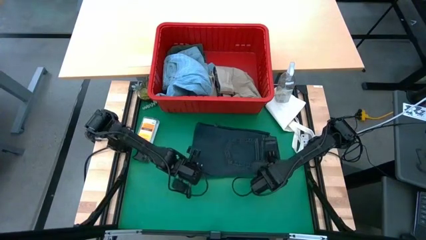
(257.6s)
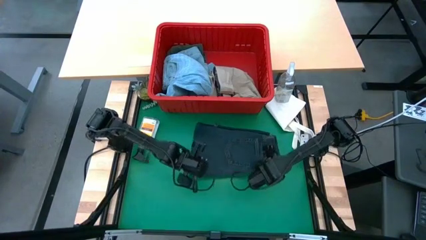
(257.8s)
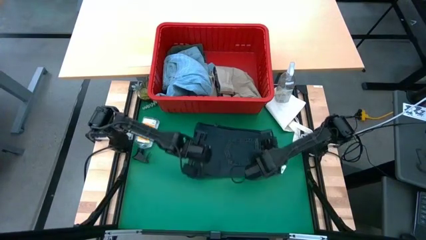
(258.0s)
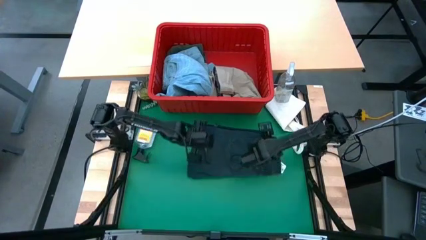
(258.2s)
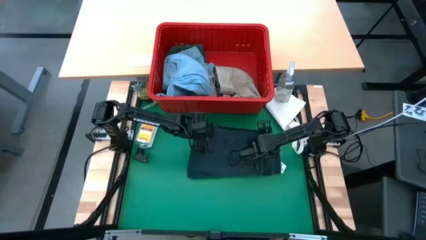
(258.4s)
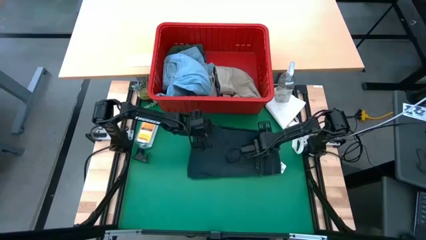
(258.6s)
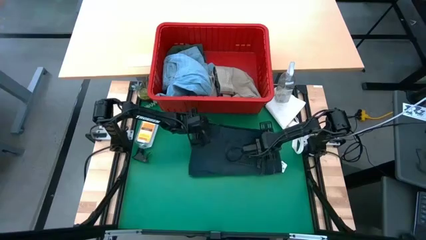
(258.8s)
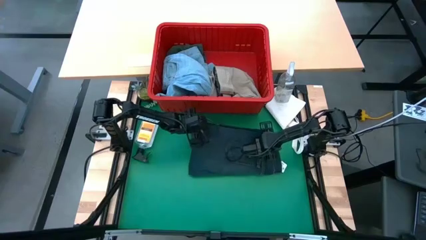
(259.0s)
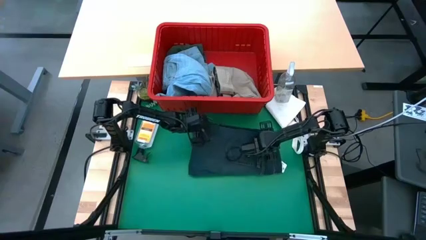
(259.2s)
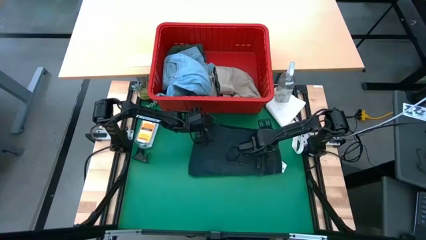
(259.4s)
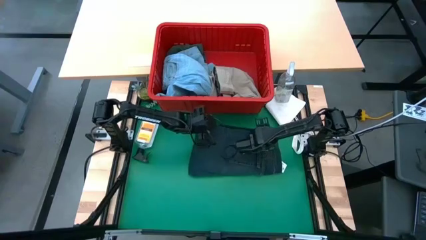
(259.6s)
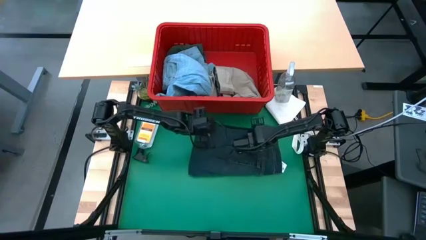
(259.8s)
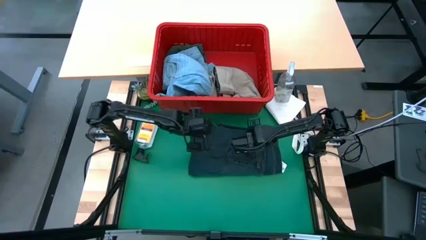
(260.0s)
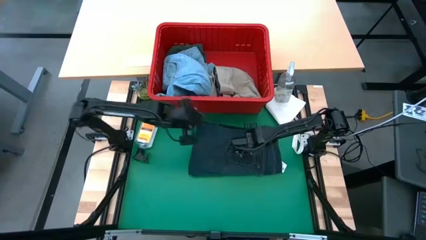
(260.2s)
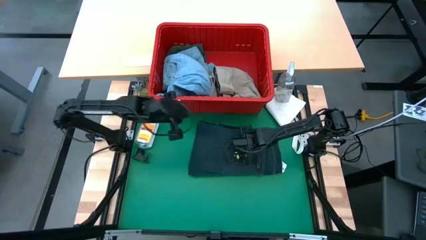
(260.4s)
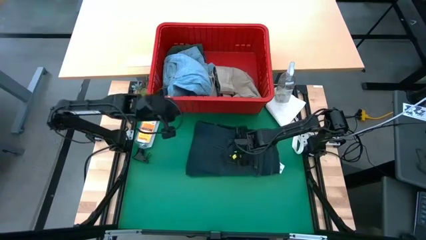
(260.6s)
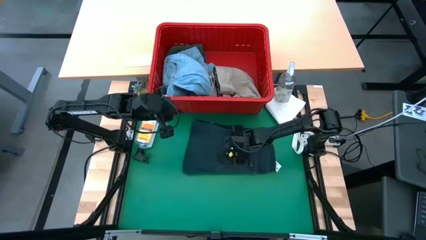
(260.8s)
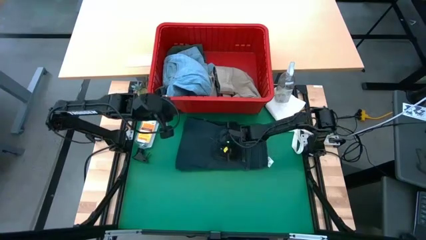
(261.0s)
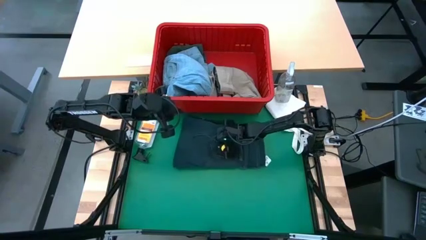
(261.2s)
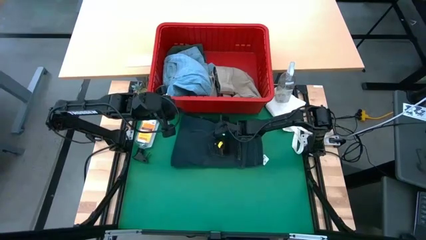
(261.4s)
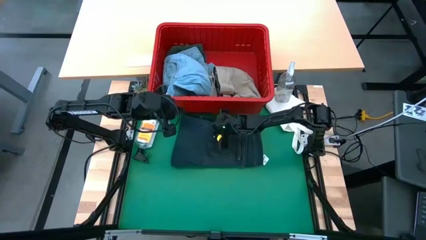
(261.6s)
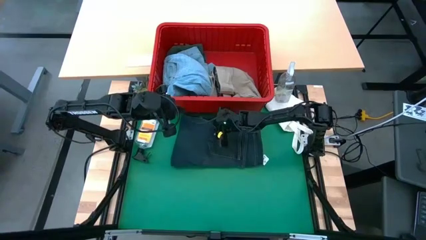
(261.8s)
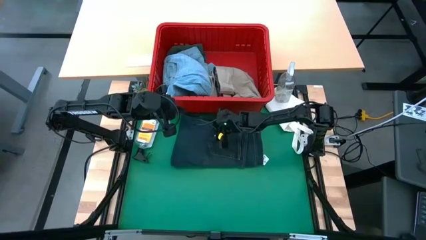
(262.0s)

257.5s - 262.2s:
Task: Fold laundry
Move the dark blue jeans to the top center of the table

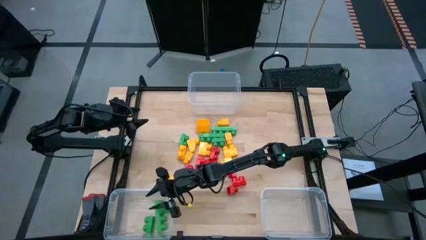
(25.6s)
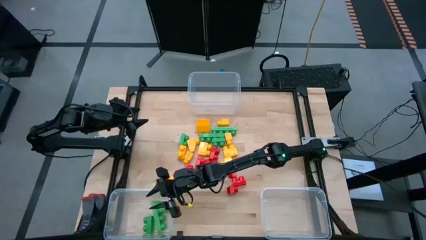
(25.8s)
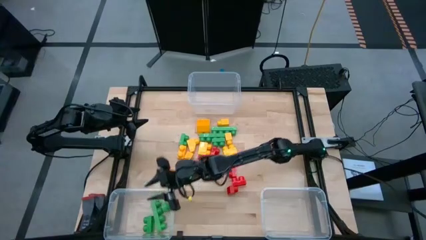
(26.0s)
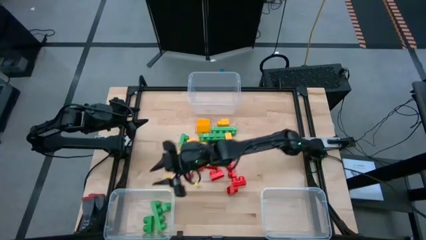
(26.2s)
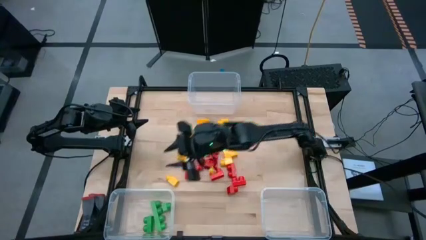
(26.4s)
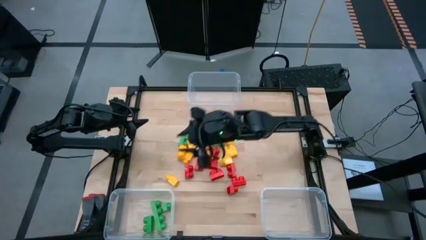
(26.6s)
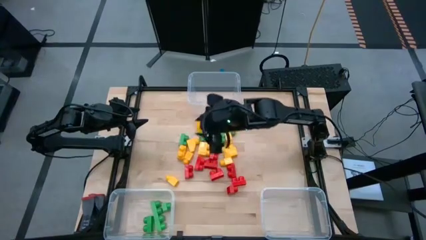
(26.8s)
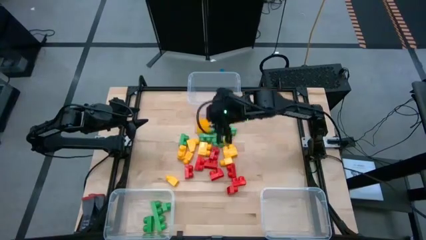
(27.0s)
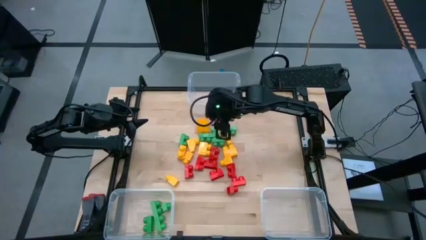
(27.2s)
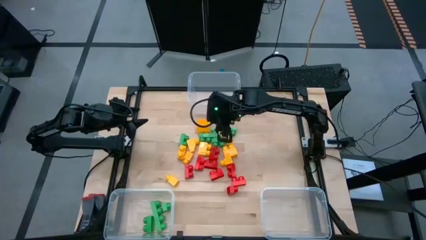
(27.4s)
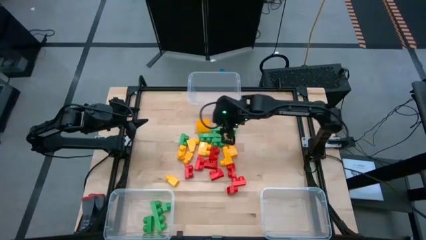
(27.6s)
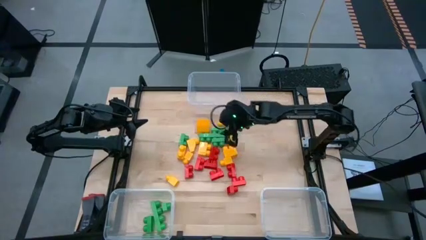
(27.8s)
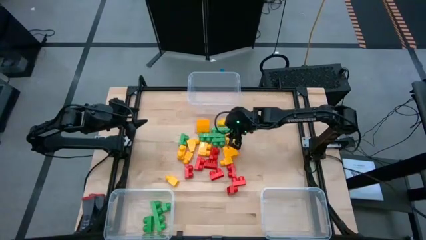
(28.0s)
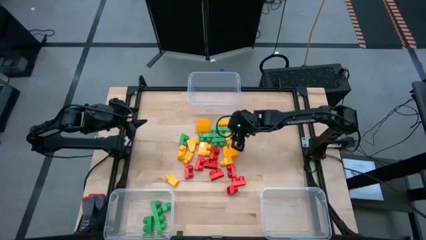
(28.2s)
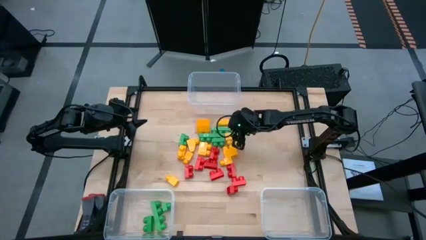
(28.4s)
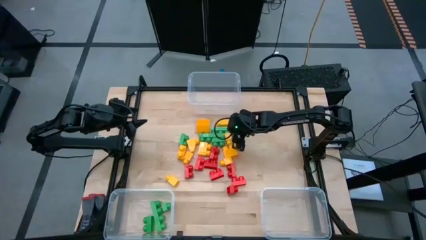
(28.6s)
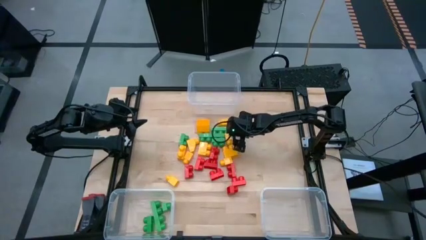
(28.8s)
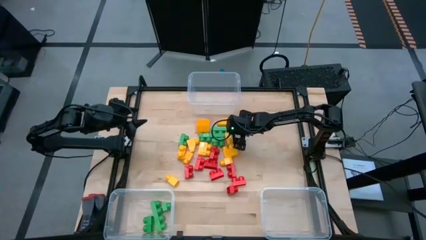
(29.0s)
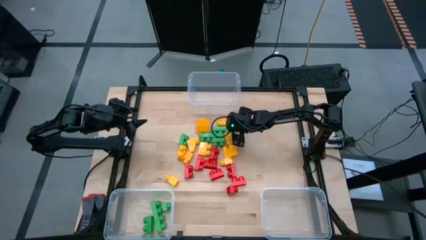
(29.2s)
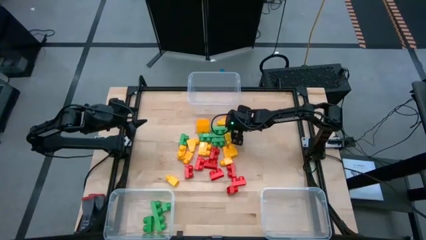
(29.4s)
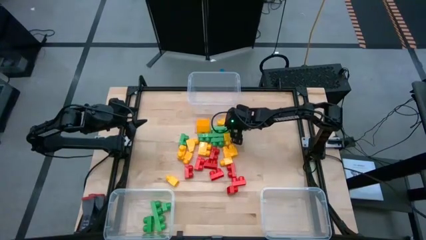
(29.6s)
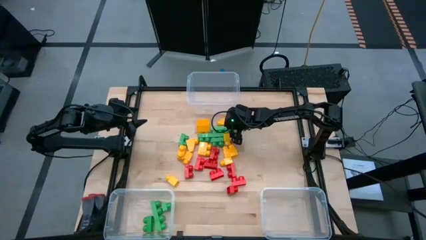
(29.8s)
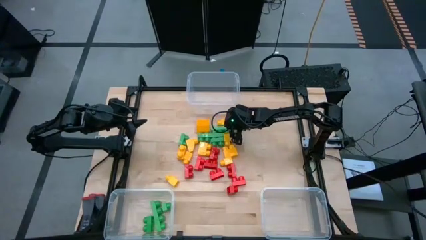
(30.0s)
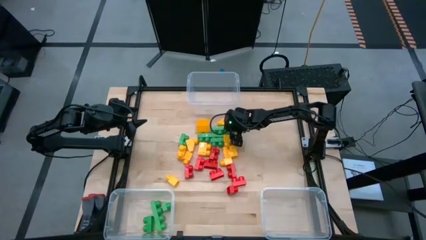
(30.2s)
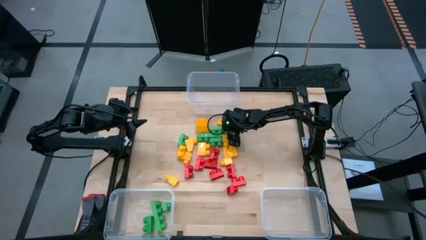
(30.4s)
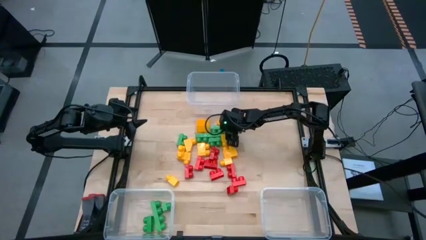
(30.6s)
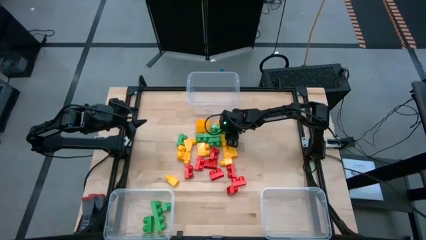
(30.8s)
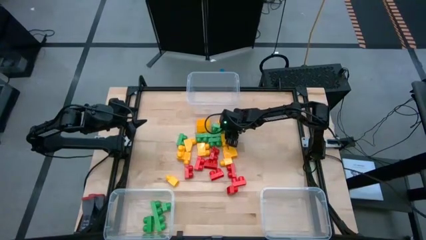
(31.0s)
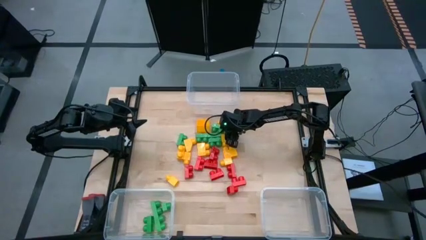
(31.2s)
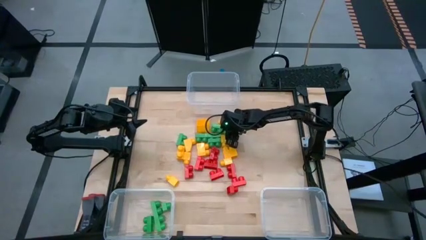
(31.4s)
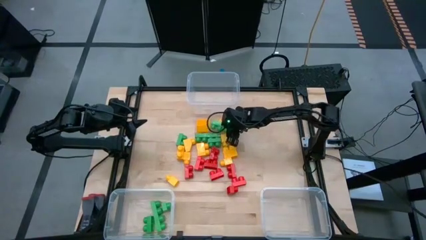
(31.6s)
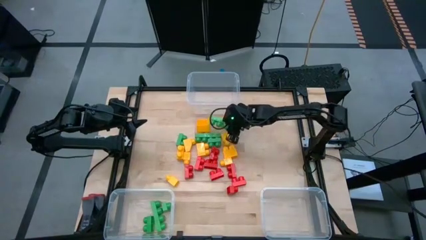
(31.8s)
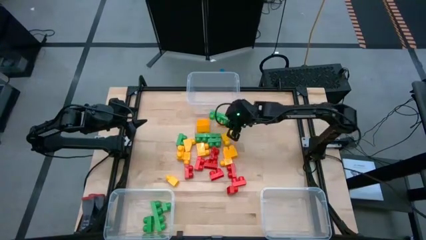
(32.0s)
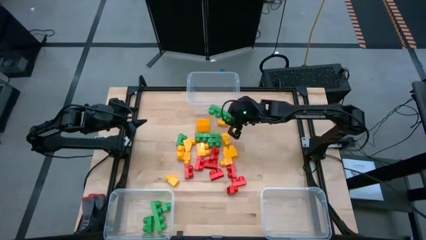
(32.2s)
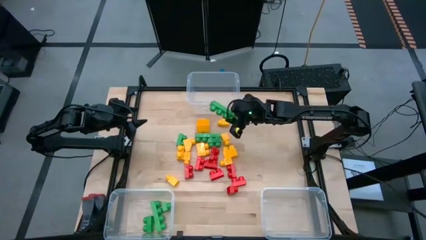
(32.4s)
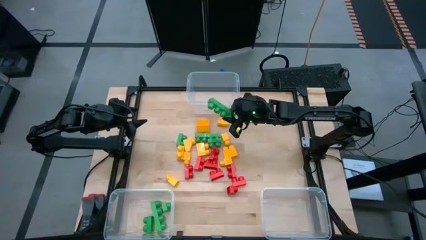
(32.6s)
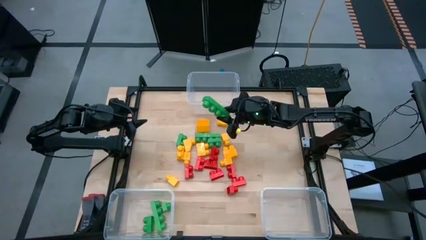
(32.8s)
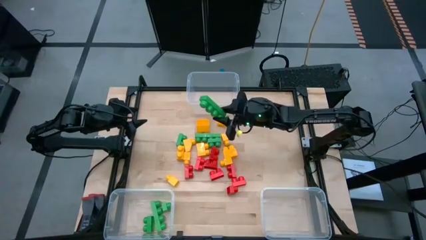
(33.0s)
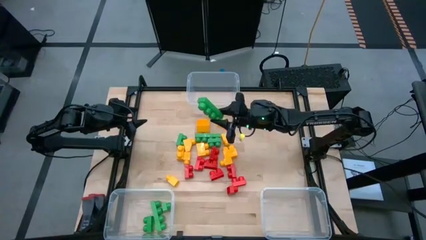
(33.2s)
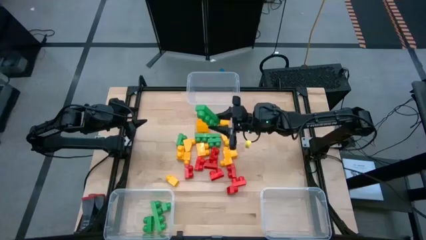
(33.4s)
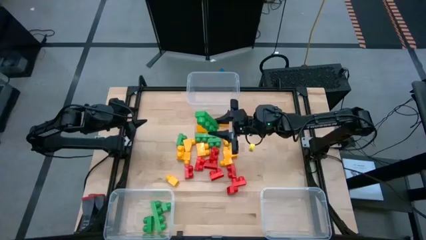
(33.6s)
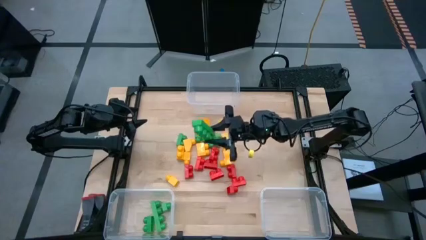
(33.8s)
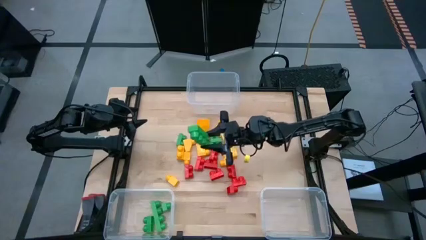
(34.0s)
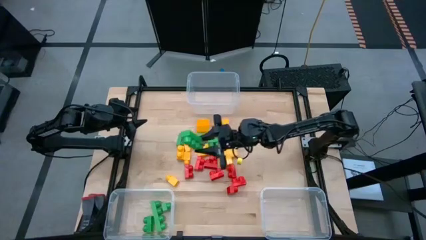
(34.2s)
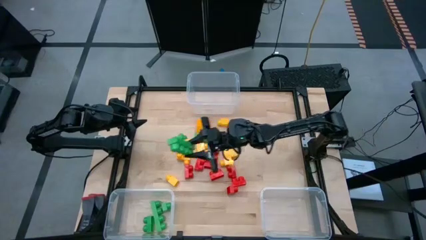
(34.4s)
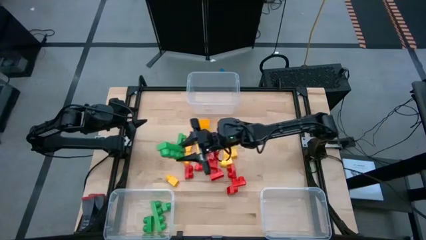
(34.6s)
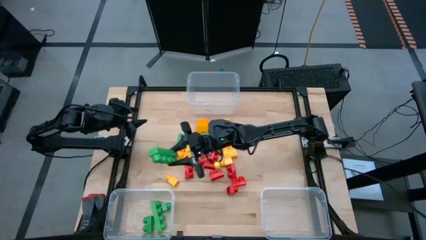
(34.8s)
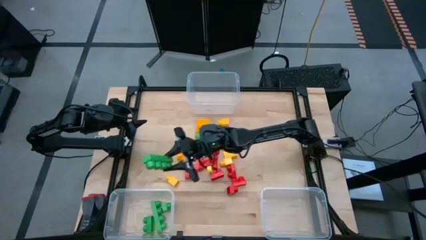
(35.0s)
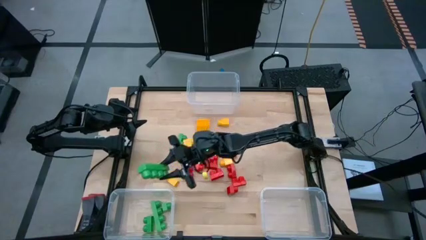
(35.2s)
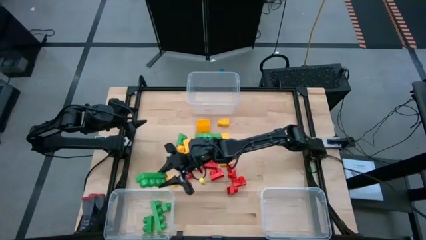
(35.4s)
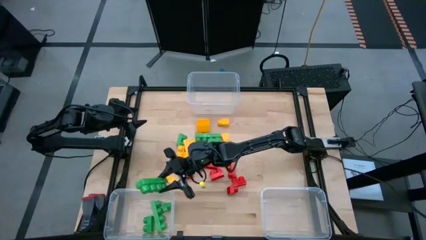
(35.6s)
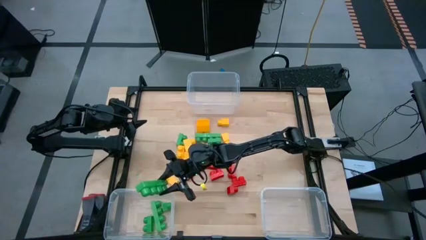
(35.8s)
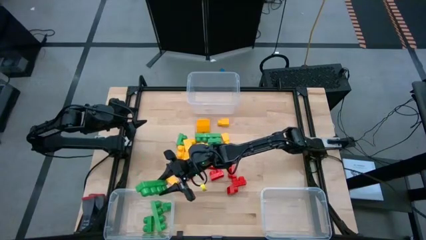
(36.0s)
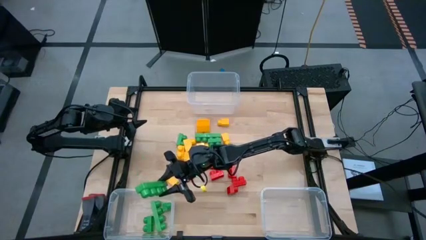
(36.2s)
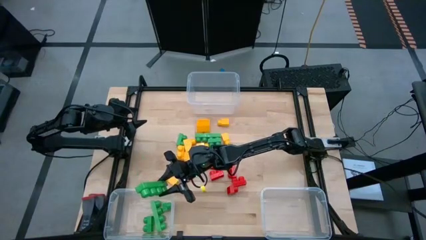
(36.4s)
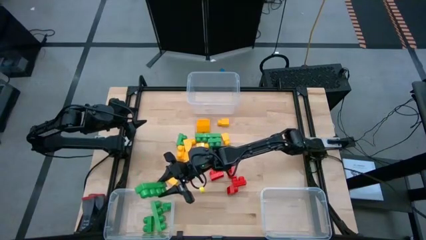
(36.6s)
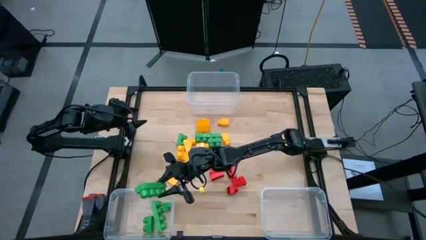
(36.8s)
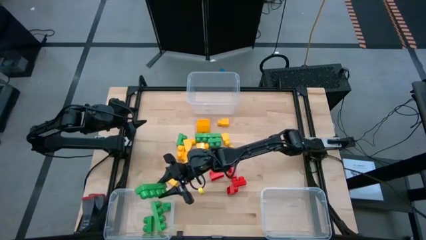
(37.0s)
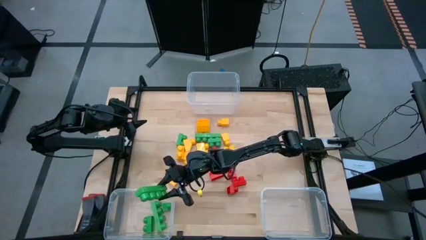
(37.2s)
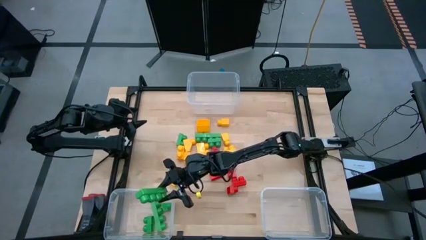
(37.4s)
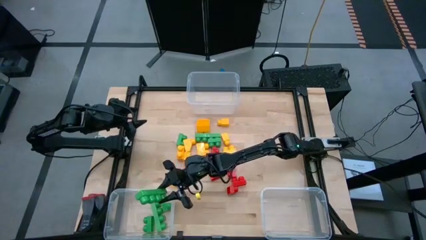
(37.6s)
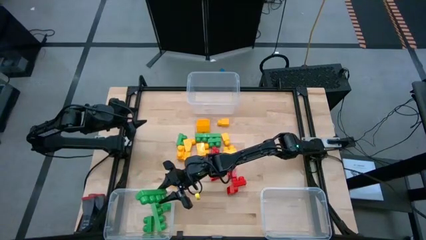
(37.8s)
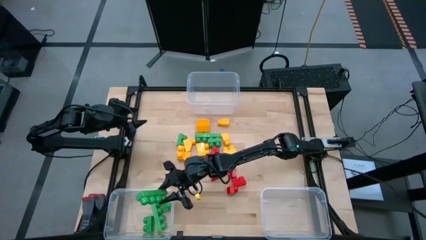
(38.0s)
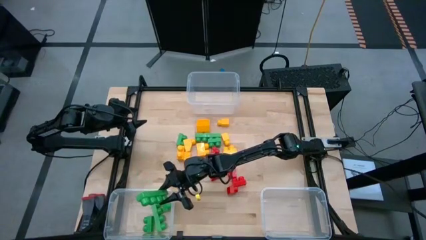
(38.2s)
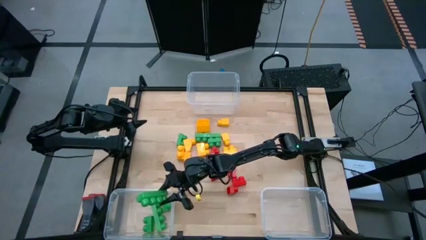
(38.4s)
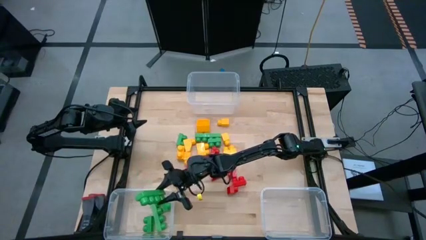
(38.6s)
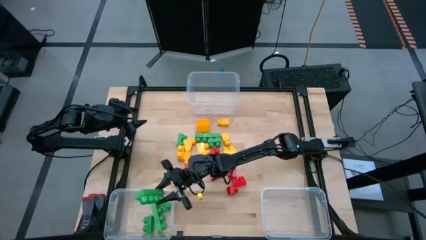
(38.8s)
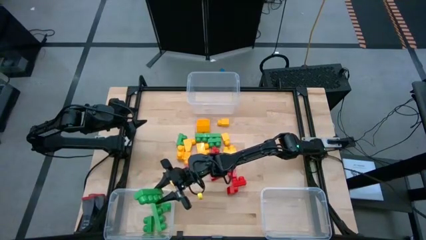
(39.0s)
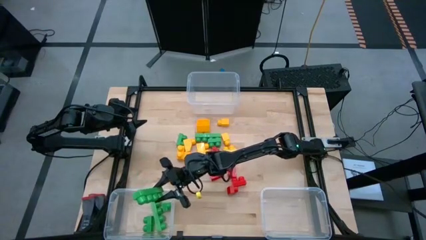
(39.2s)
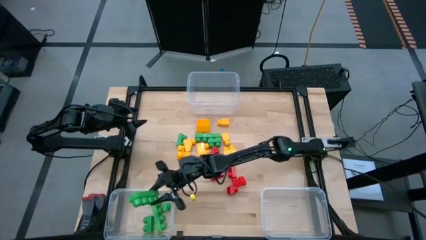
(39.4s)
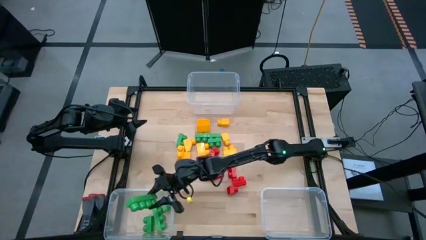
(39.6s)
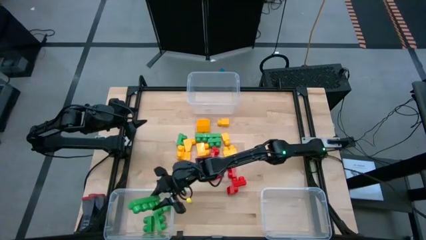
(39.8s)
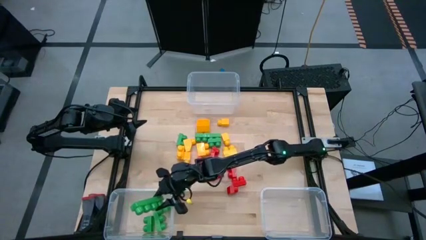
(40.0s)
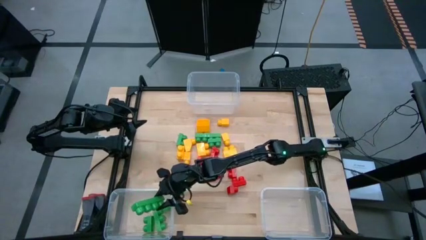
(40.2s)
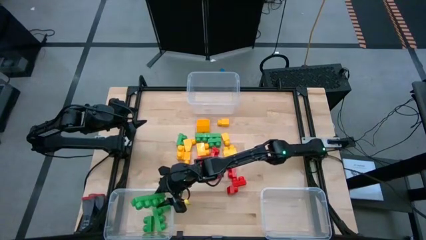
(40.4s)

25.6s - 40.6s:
Task: Sort blocks
Put the green game piece into the bottom left transparent bin
